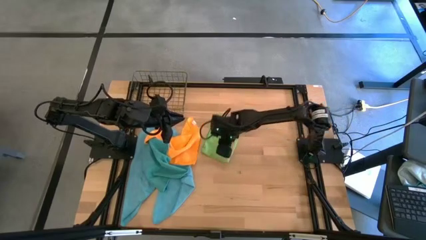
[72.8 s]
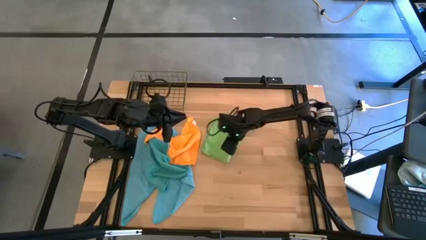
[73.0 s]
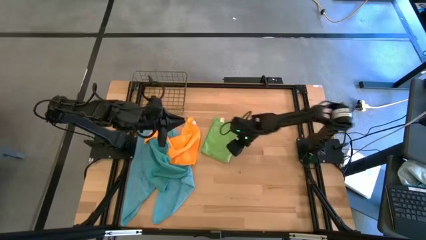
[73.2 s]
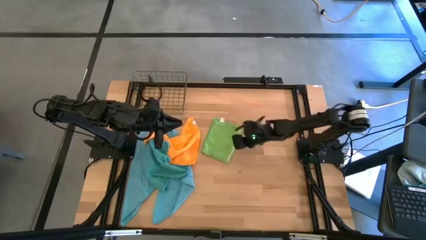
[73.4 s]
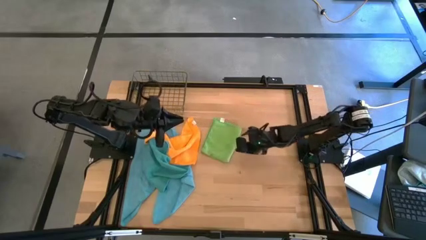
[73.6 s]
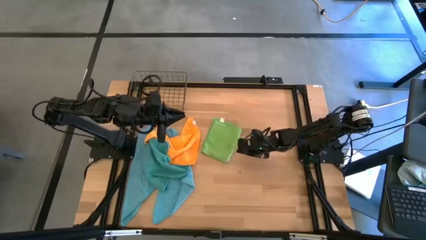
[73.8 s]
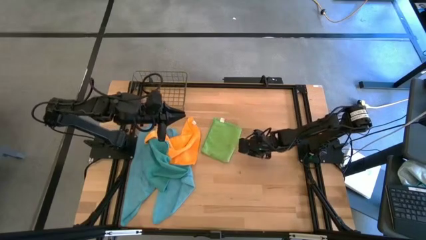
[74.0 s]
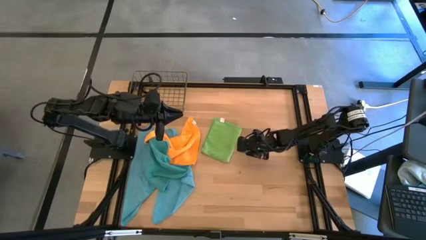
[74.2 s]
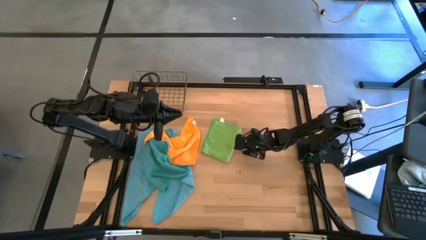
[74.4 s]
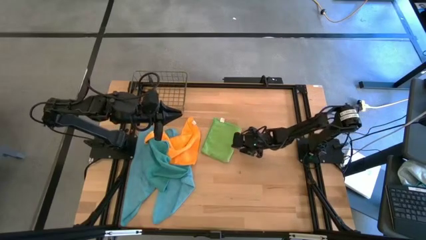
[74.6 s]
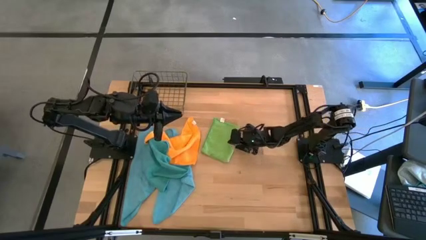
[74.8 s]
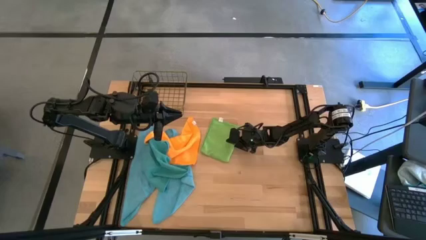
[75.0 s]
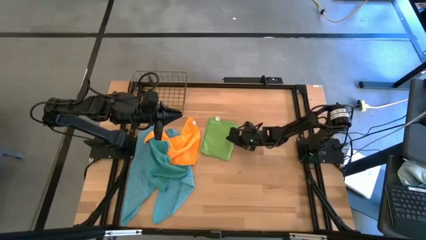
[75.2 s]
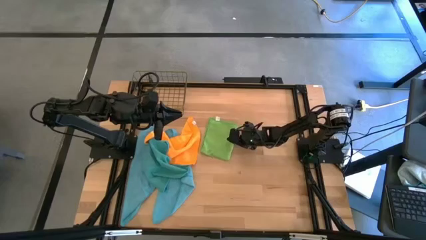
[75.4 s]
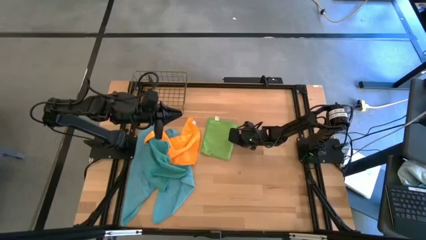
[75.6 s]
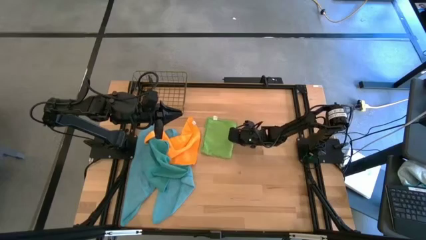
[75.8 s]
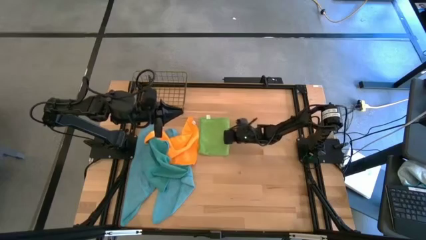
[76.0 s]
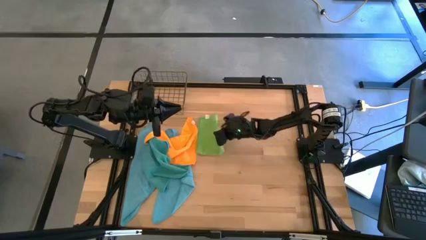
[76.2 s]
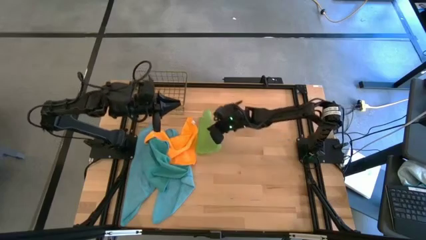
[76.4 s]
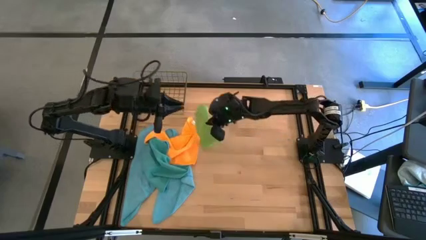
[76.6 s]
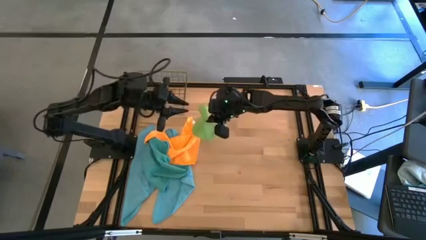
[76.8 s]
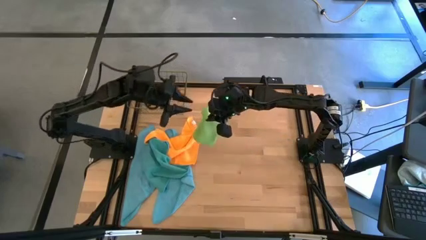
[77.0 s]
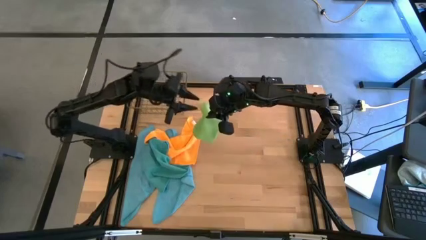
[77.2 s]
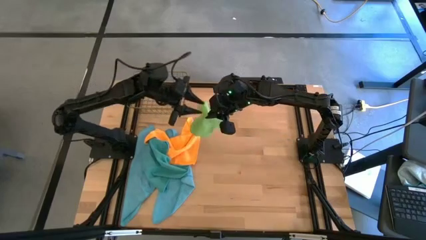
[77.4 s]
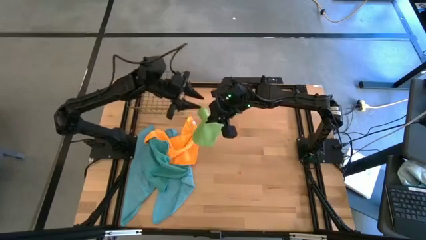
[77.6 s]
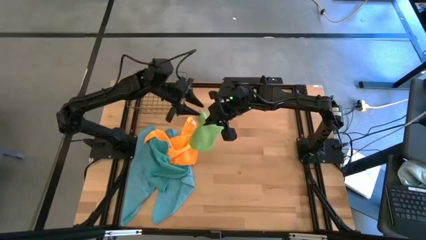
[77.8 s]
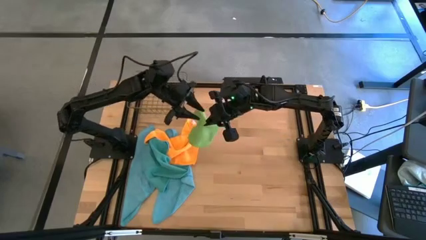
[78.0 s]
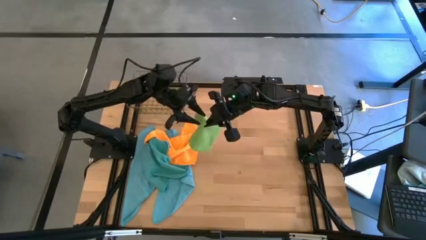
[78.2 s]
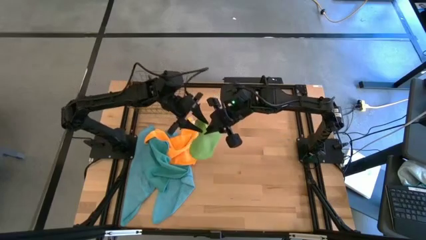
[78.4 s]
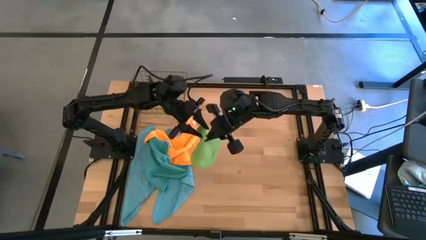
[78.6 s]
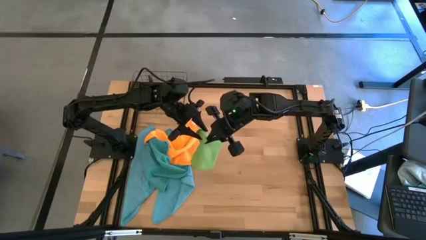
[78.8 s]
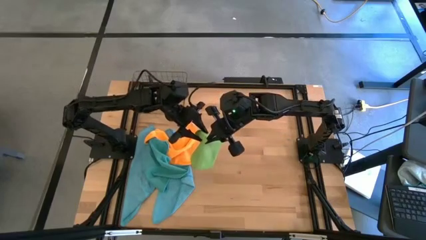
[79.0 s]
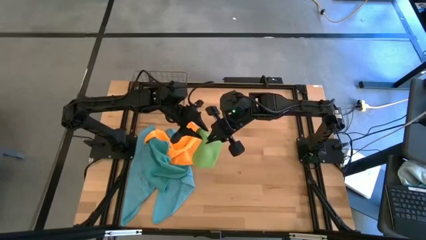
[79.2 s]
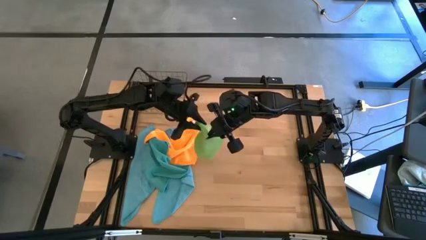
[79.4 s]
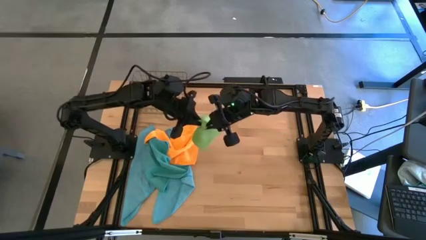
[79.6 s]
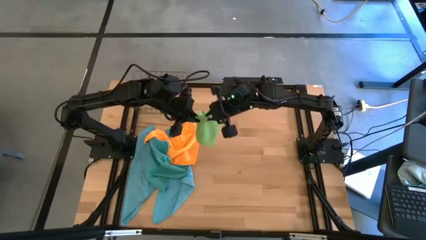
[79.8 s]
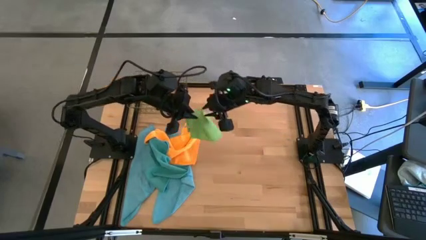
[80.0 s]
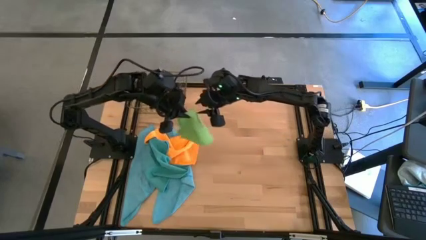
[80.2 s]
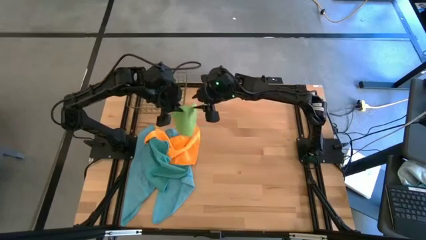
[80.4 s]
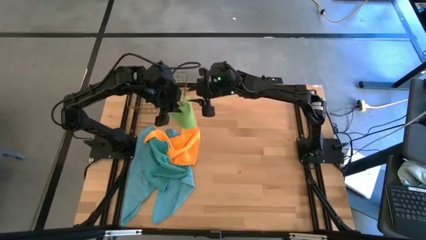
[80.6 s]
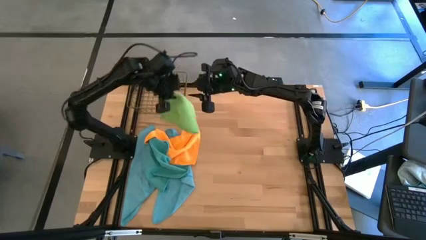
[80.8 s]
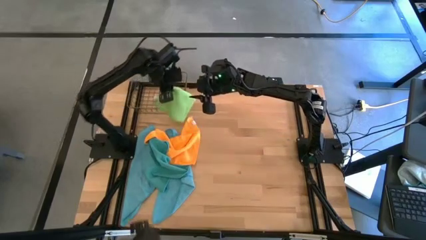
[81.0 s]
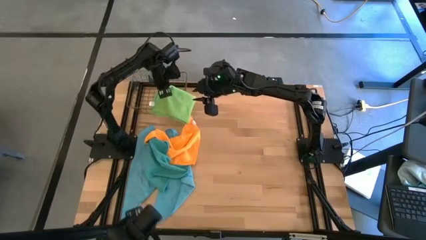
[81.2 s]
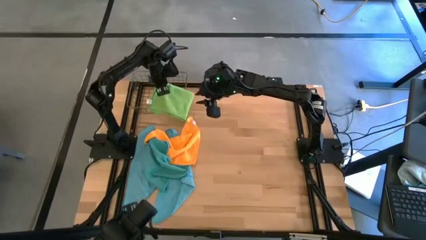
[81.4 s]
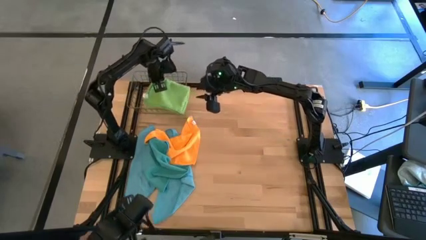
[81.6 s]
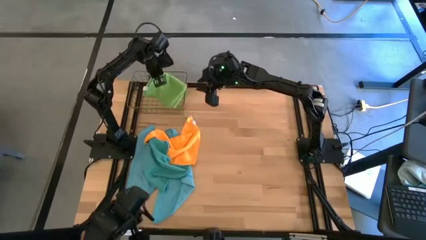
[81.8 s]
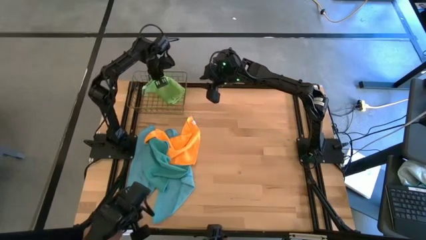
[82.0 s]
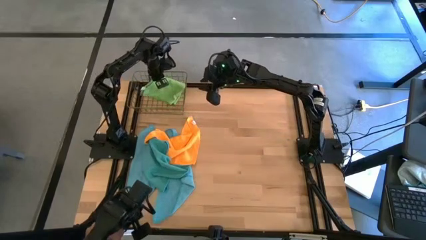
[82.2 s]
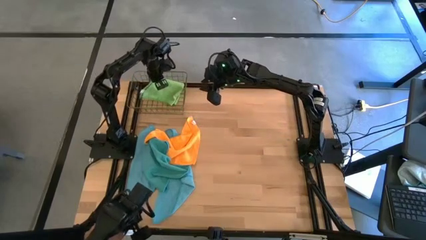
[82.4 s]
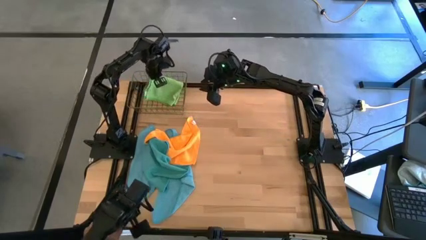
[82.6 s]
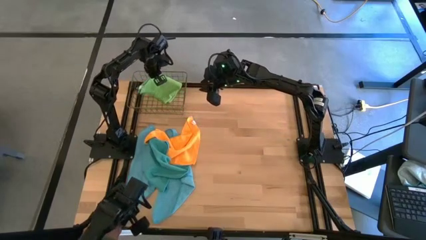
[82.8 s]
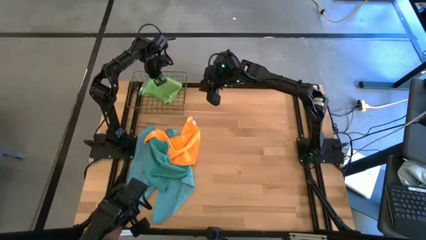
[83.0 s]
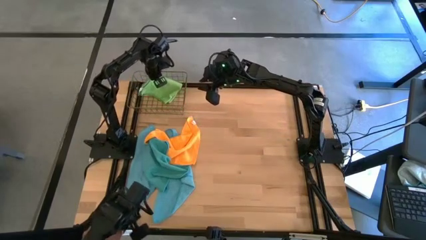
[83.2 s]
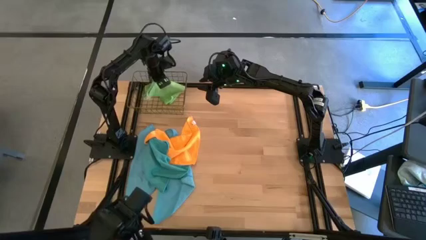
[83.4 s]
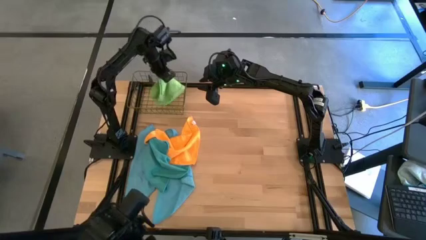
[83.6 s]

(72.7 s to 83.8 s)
Task: Fold microfiber towels
Put the folded green microfiber cloth into the wire basket

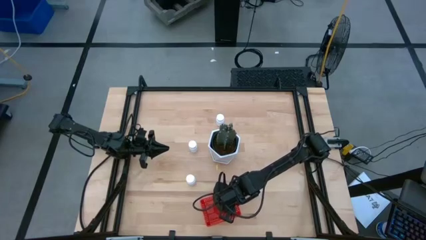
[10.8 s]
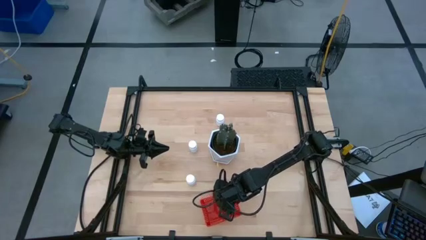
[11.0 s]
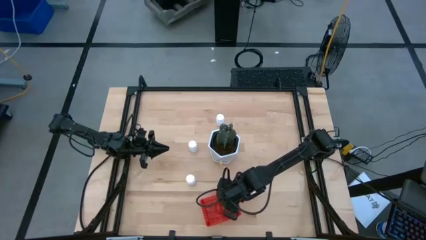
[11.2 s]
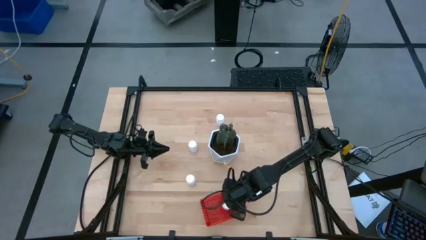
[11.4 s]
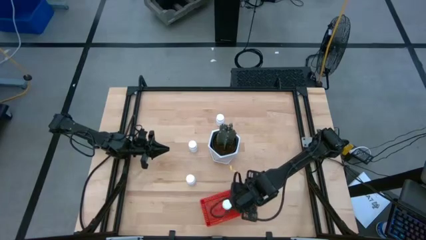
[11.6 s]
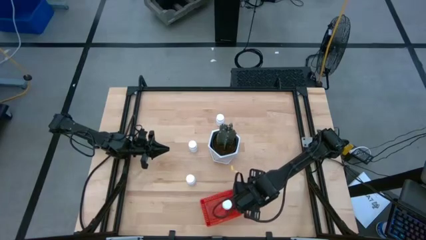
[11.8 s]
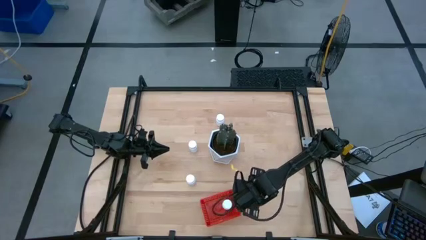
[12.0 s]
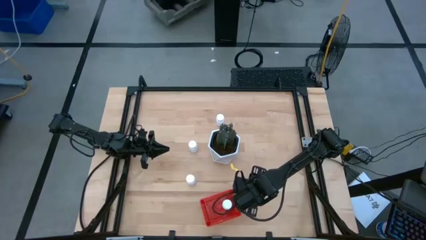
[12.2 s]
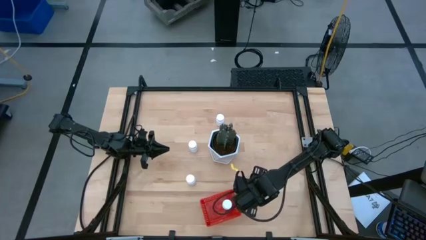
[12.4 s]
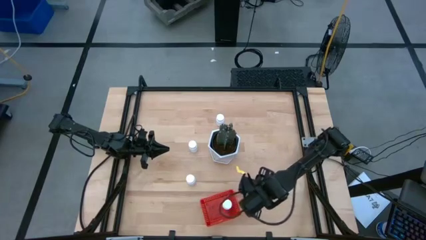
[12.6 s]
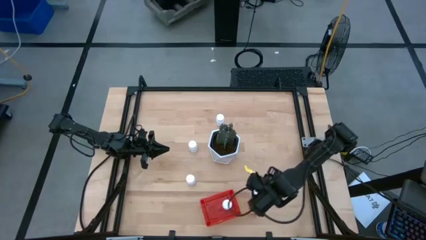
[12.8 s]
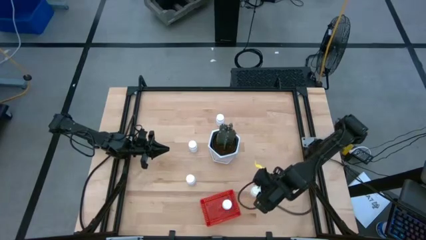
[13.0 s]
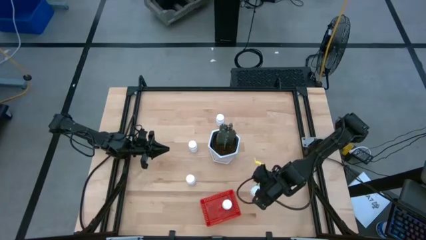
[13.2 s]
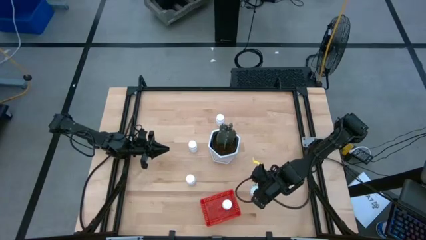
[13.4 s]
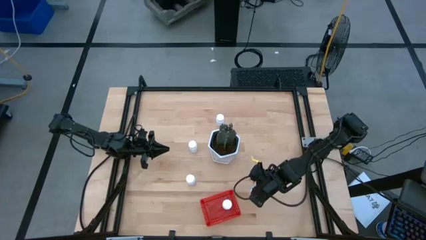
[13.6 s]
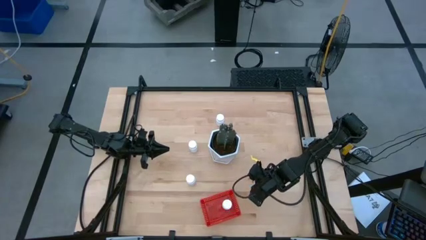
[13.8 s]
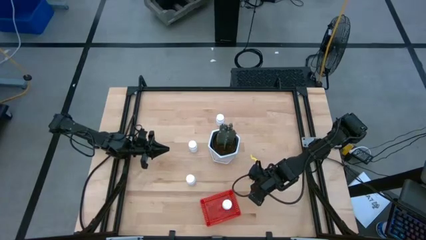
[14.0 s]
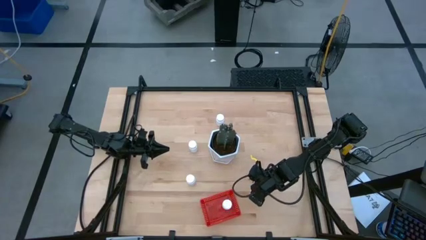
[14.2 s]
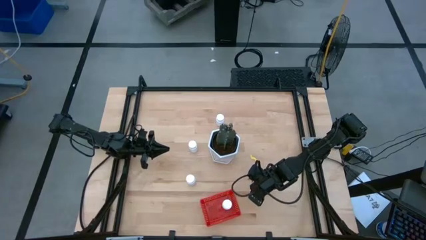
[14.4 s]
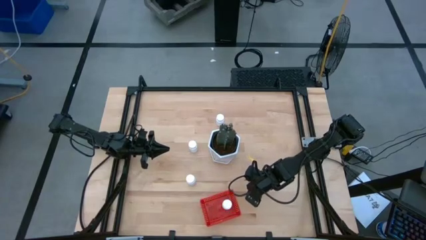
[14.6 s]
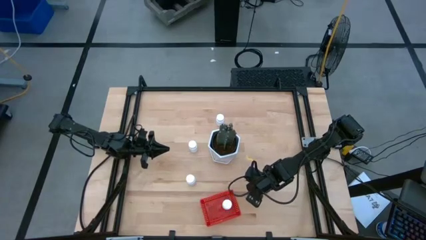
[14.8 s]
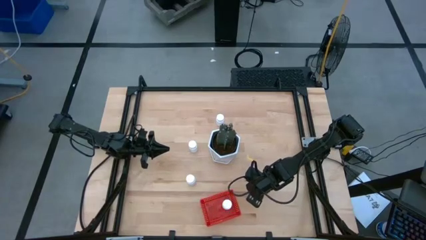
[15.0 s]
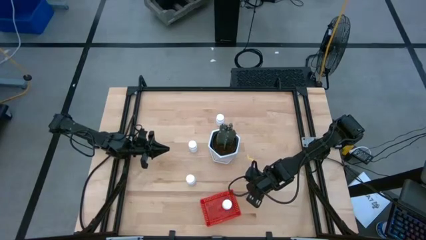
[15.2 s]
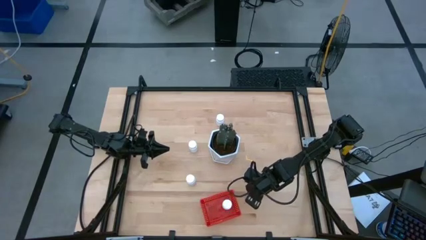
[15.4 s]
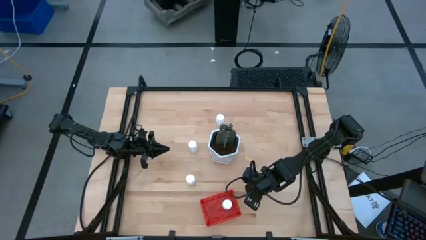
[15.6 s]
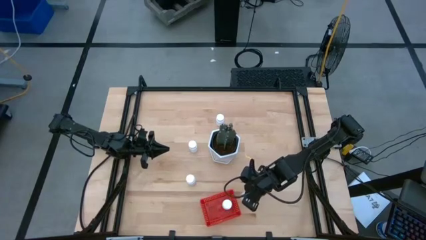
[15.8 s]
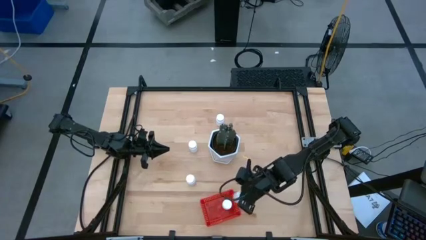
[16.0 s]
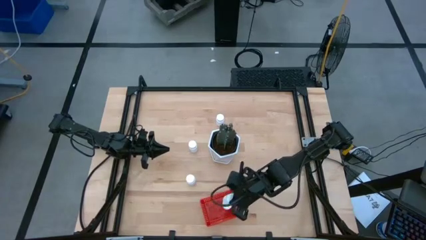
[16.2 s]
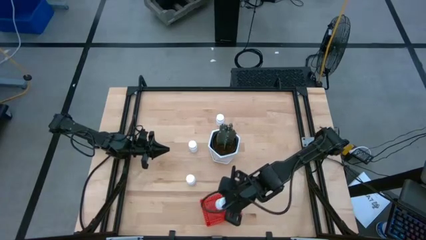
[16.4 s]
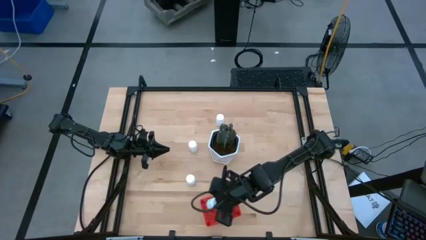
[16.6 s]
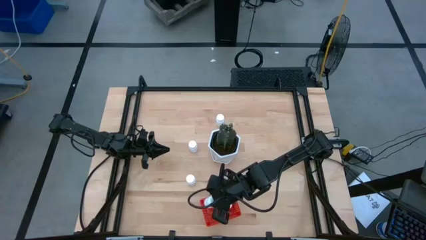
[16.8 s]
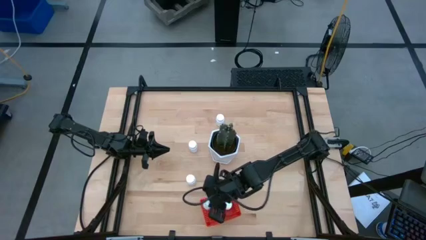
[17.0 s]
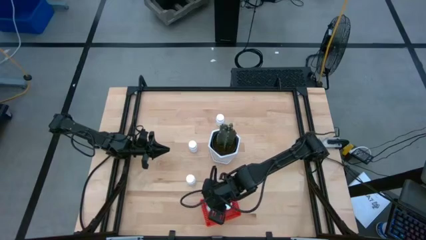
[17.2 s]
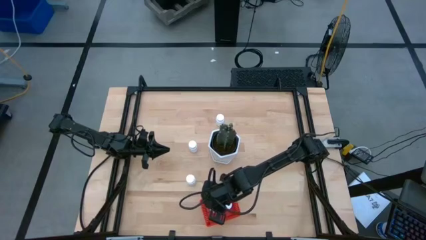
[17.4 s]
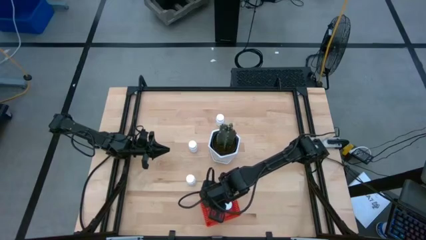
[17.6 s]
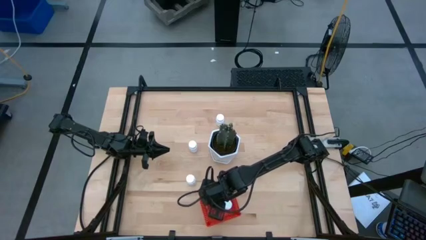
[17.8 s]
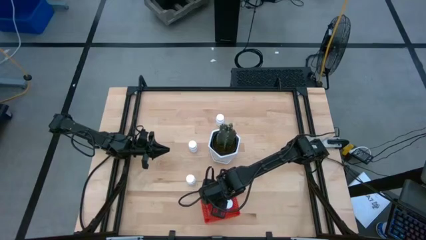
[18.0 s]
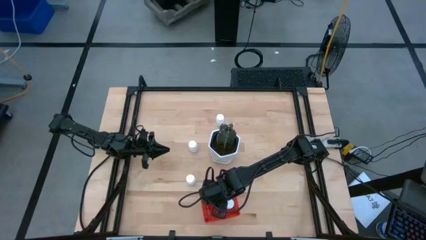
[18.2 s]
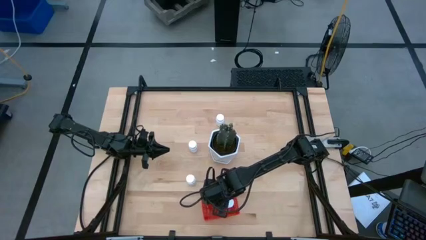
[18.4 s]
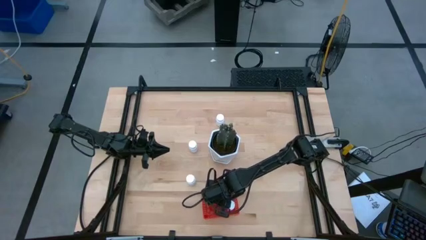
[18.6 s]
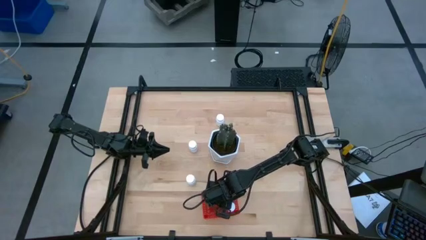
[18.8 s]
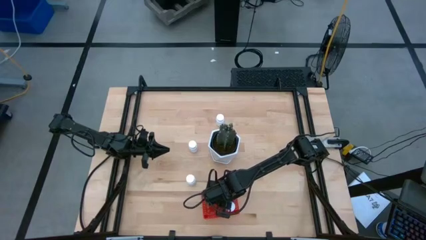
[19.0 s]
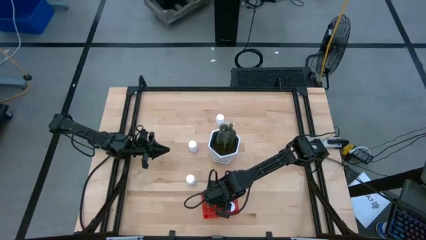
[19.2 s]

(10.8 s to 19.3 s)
Task: Pick and place pill bottles into a basket
Put the white medicine bottle into the red bin
